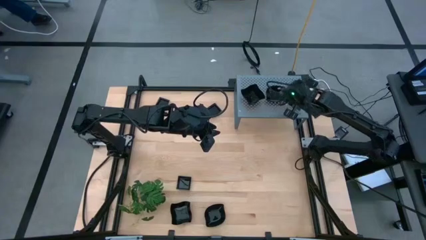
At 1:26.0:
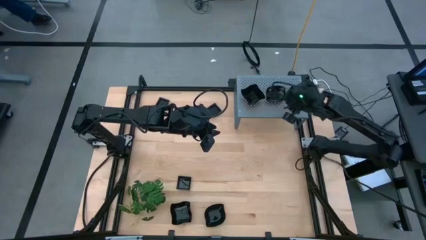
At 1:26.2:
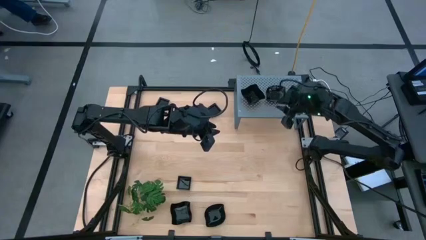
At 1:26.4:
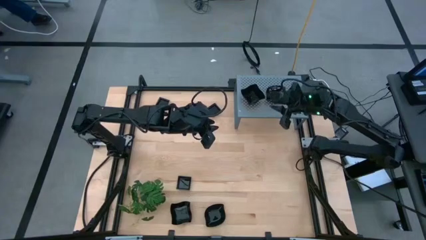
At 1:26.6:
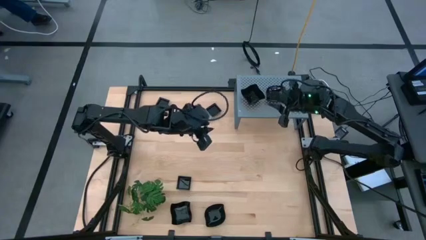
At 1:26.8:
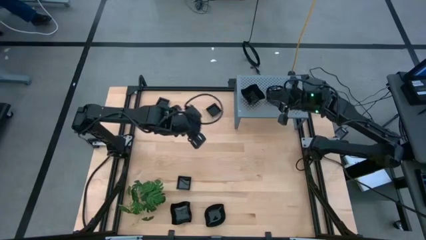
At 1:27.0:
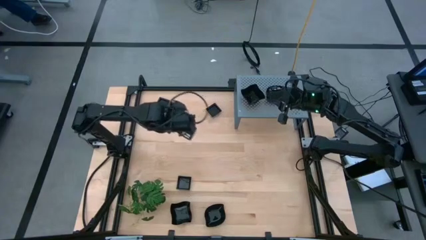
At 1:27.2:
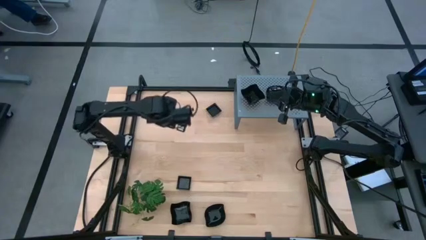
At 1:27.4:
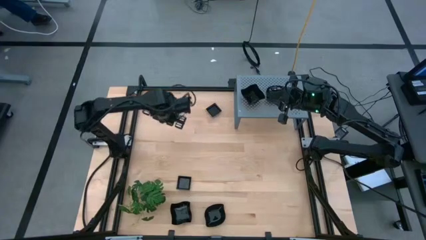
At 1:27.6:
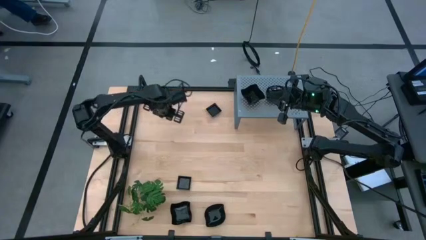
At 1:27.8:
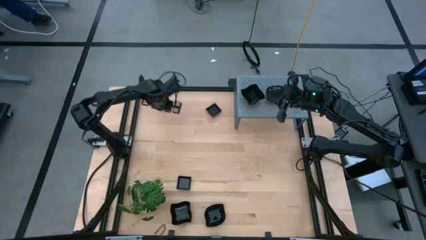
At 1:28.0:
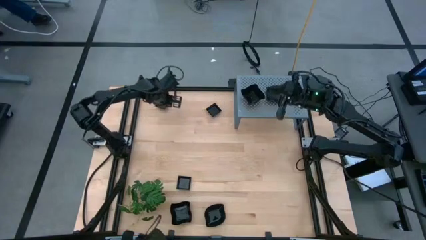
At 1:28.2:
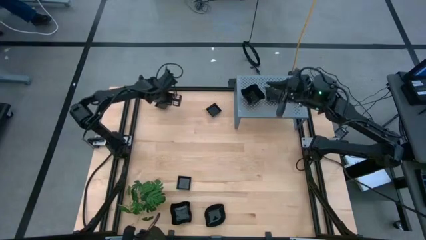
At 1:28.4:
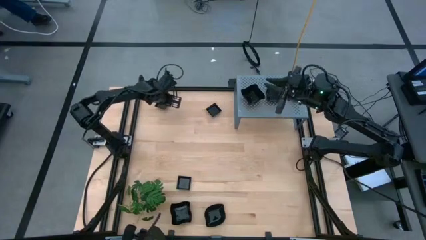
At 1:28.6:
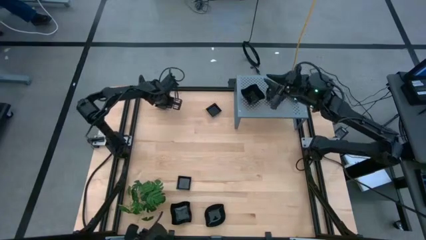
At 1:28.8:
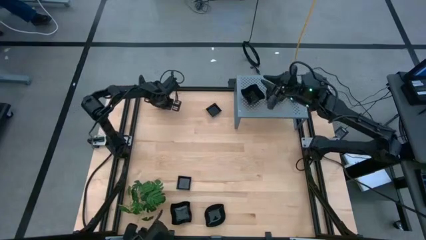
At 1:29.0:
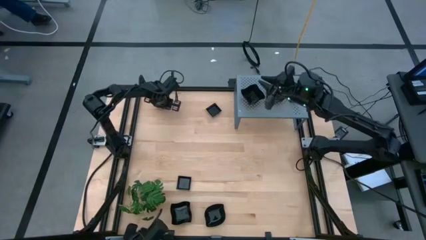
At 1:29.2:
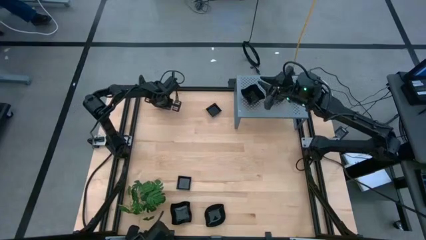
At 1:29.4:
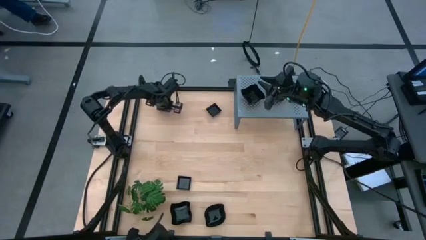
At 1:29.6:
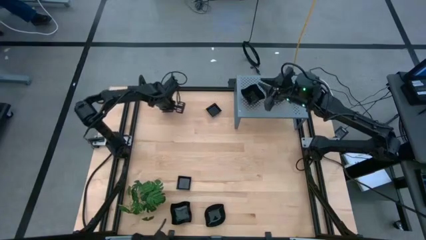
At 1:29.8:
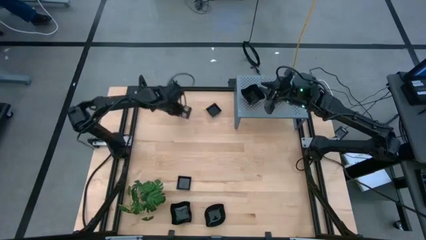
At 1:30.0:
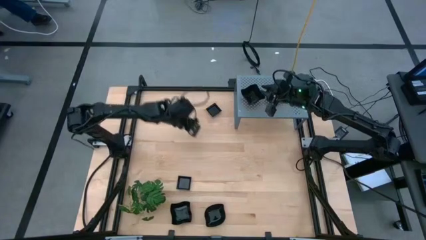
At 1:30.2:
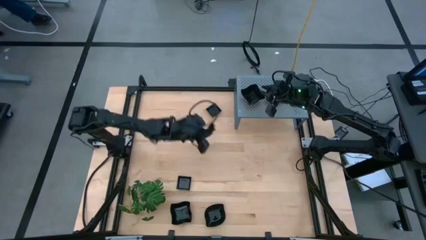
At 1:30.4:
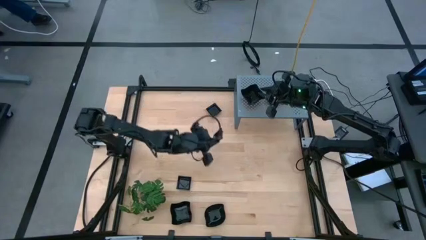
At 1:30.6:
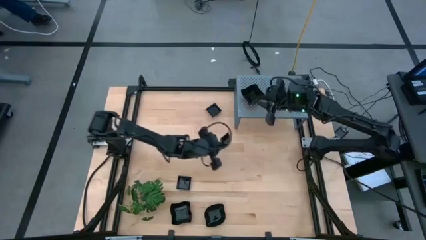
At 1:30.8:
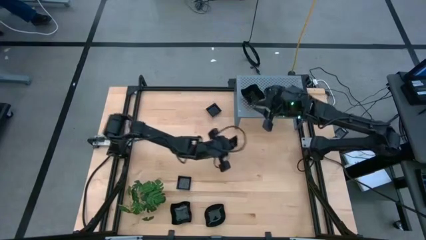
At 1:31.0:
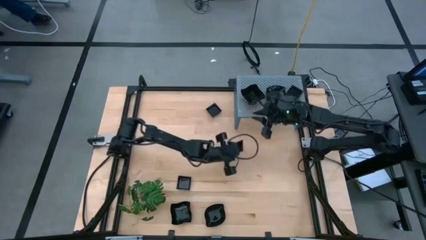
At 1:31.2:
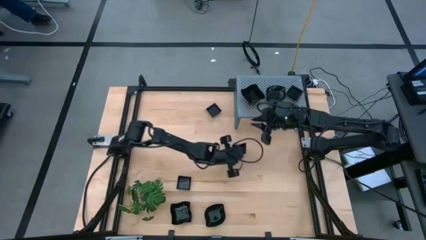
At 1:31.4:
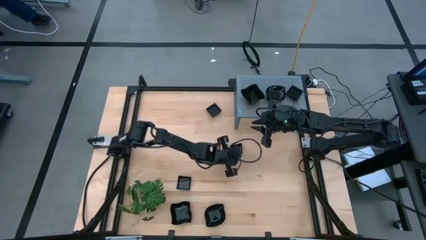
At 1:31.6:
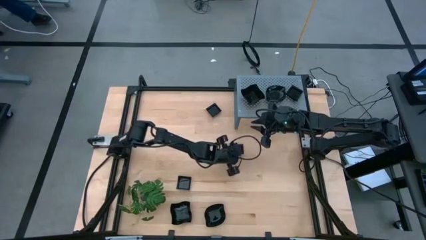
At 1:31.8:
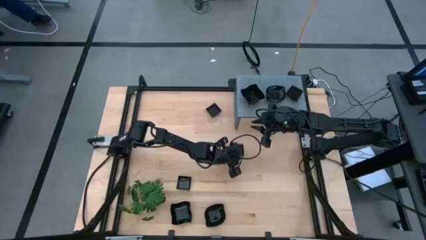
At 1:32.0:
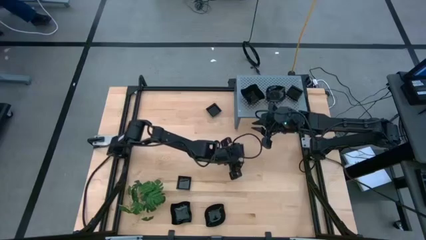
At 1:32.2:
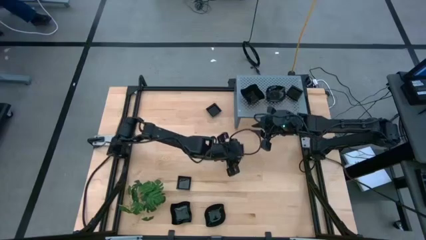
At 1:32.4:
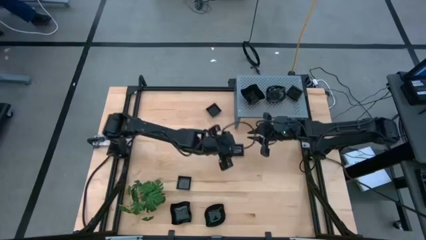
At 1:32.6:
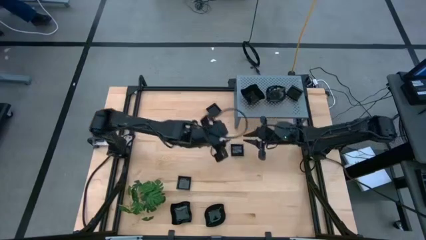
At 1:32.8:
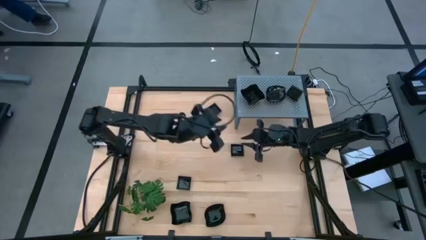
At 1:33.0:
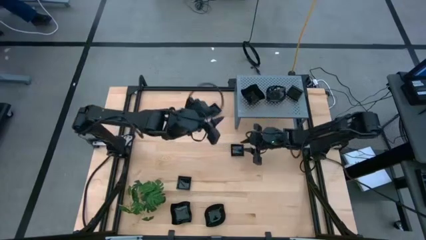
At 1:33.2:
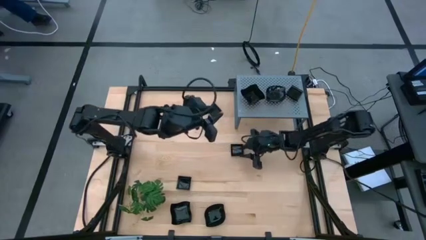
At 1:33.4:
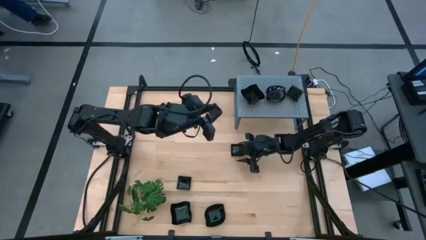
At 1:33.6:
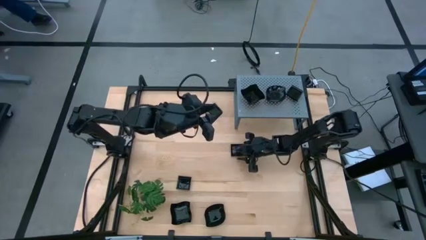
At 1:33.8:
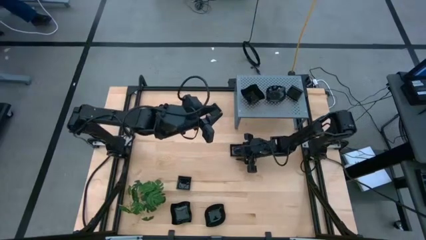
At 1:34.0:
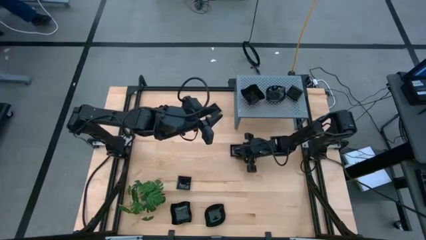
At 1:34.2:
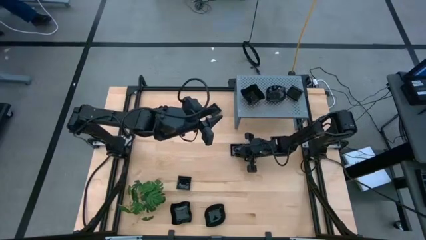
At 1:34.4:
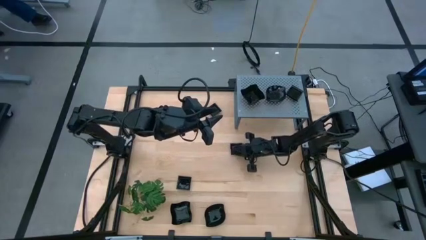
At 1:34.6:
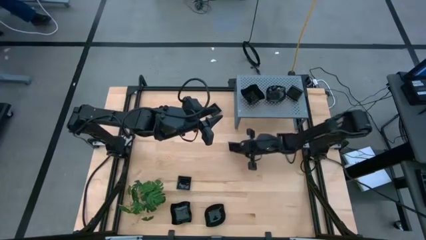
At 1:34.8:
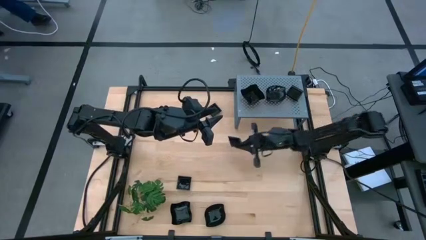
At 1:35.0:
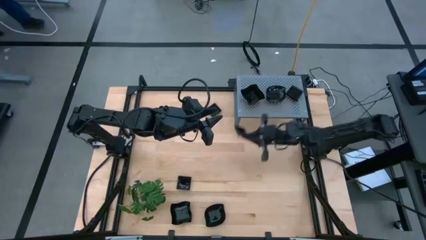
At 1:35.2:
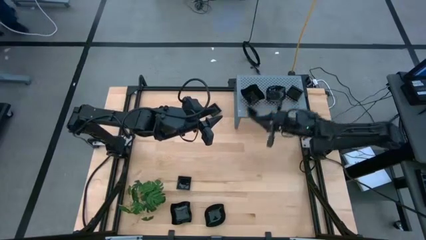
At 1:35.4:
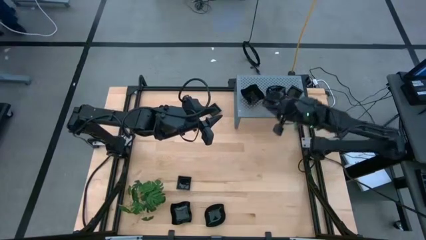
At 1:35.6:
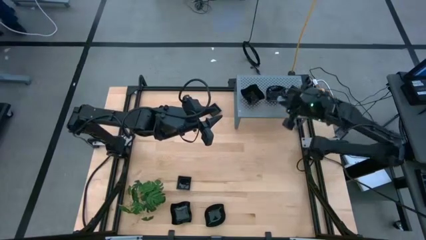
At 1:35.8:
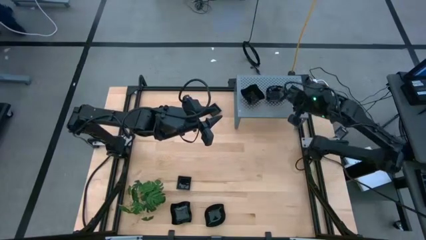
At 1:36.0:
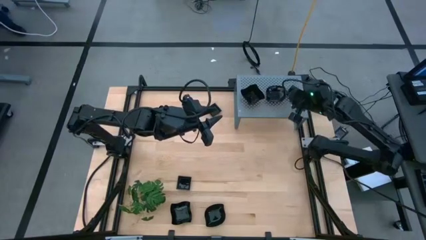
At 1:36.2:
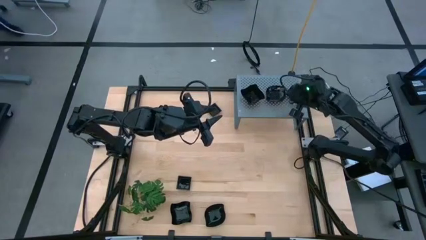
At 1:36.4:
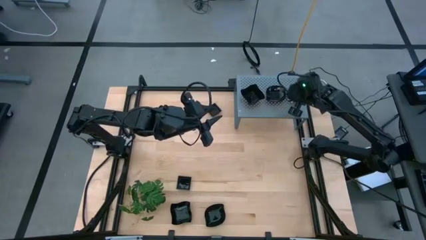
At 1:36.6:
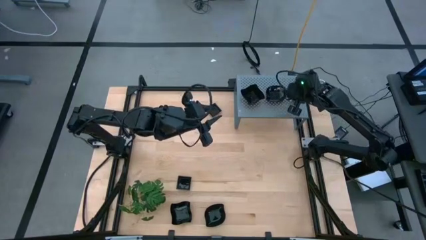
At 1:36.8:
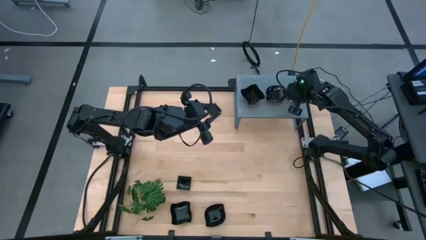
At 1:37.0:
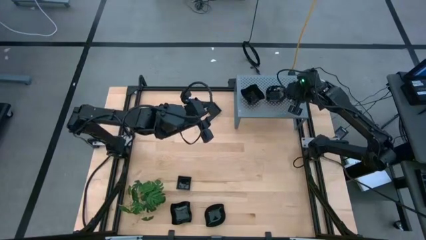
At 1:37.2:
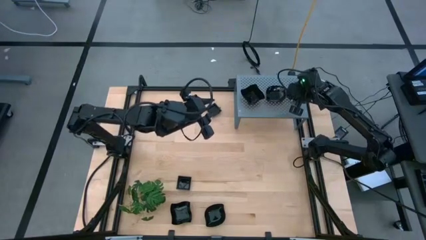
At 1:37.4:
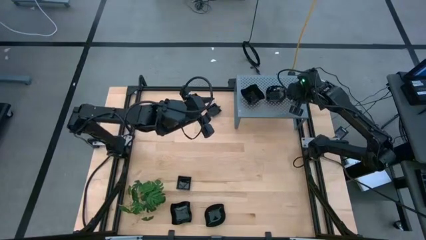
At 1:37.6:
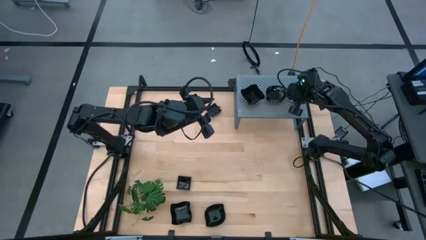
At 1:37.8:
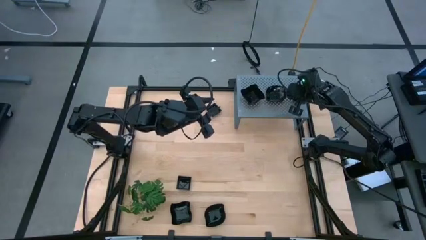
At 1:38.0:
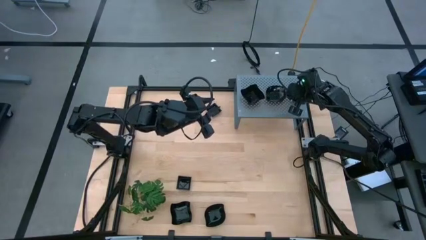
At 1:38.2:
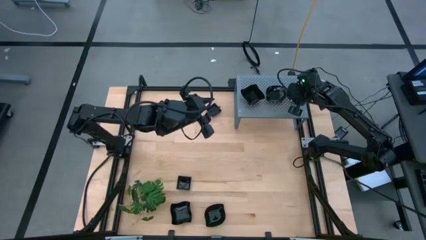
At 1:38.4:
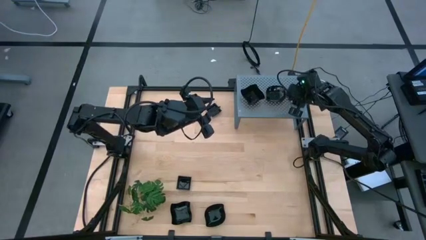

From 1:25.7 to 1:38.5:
Task: Pick & Place Mini shaped plates
Stack the black square plate on top of the black square plate on the shelf

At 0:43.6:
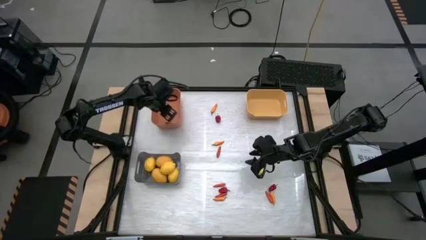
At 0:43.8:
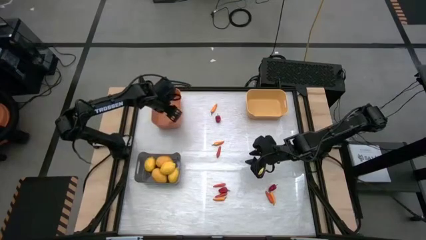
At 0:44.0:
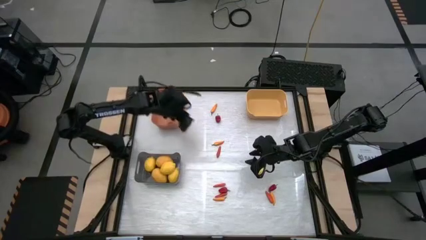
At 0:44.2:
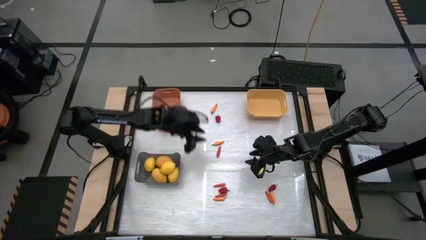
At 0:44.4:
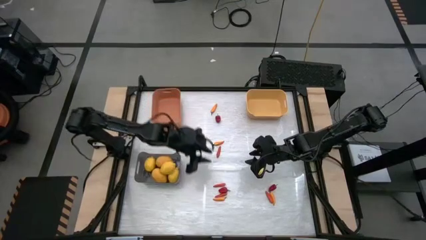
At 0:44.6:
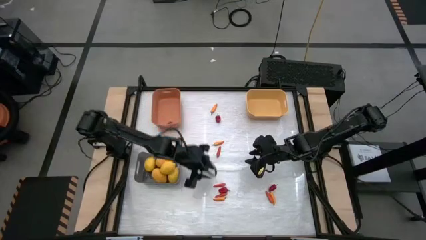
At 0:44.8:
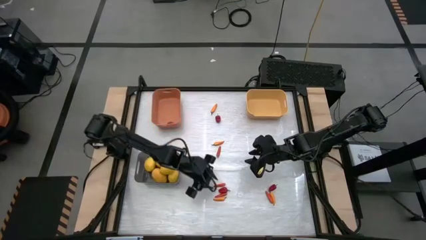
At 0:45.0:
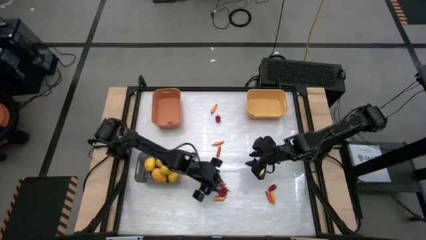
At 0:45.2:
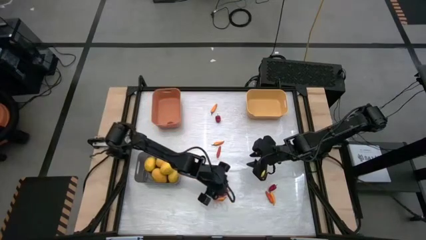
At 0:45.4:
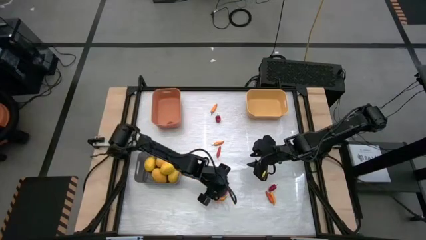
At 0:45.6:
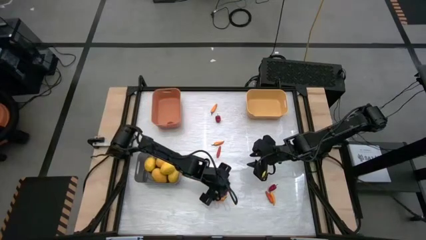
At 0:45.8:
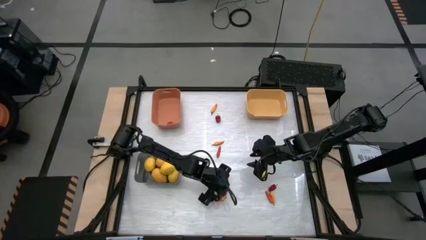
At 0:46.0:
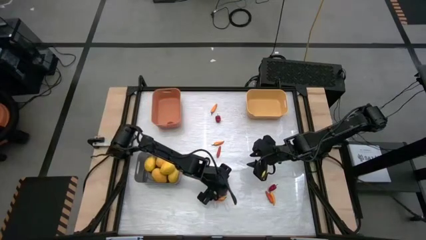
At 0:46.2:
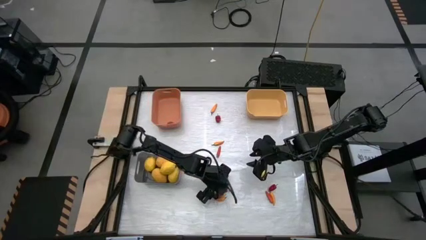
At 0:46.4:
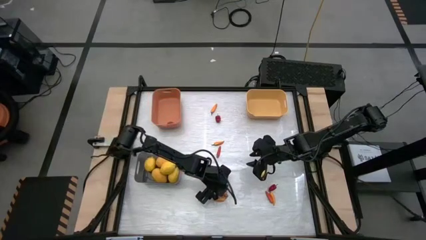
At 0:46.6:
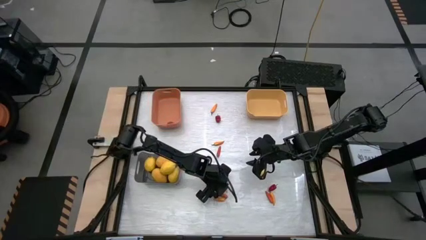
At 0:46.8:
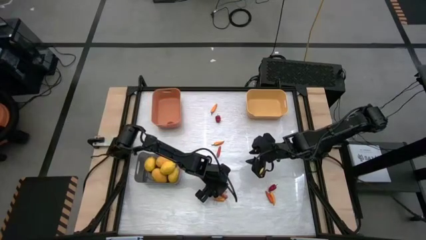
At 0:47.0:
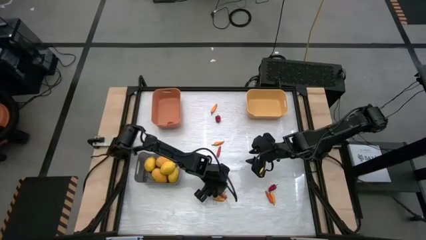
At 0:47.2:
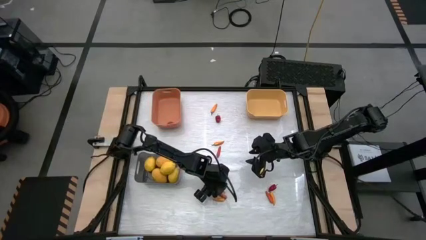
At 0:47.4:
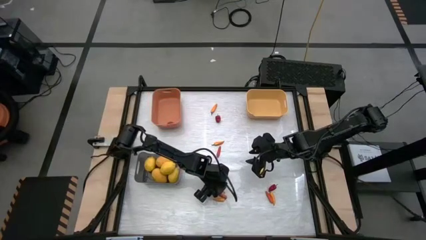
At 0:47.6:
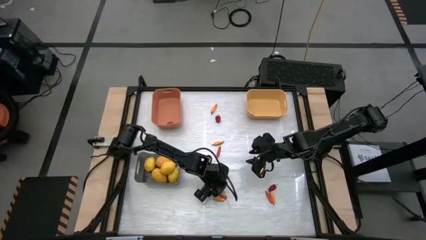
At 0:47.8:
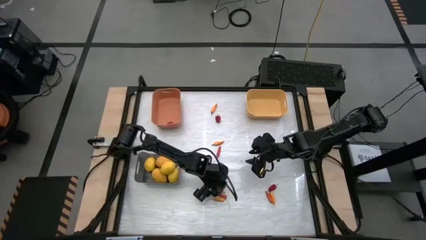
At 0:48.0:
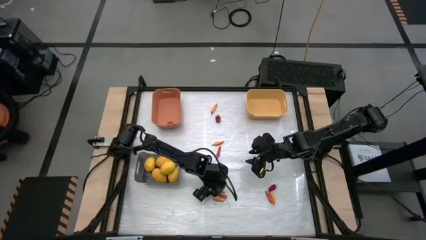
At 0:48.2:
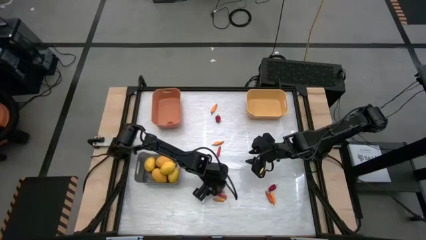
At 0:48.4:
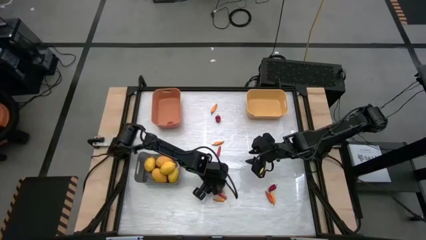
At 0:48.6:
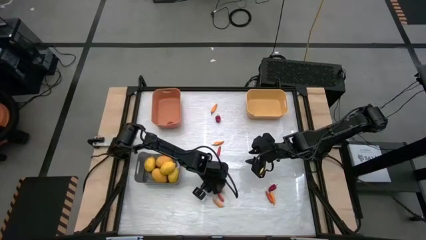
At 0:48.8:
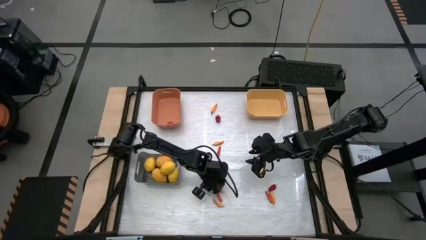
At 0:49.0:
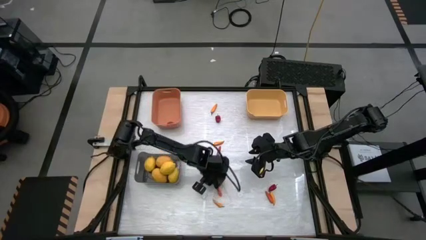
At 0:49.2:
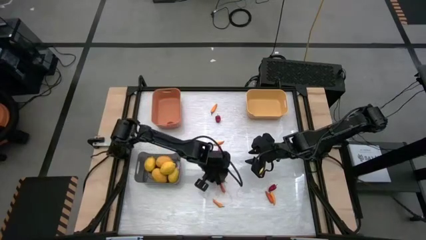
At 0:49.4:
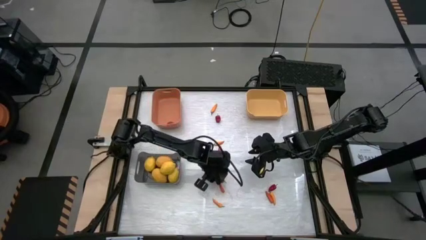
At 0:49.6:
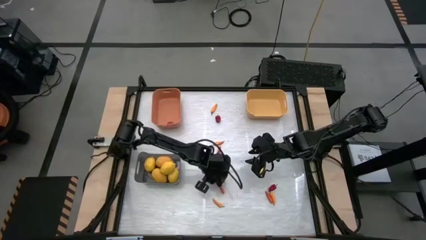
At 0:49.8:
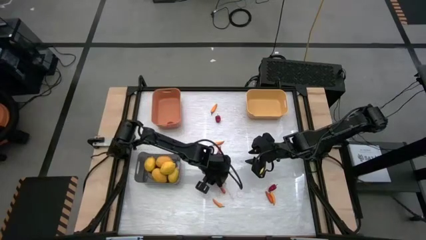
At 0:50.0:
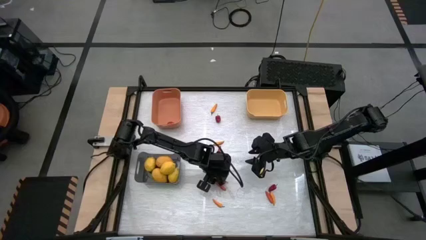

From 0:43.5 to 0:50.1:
Task: Sort produce into baskets
Put the red bell pepper into the orange bin
